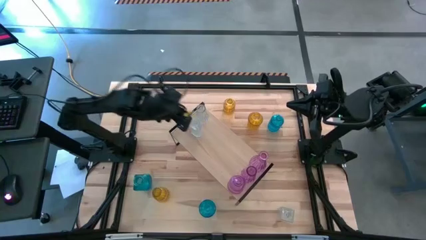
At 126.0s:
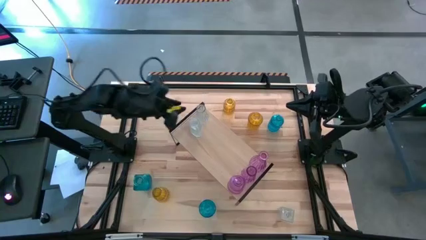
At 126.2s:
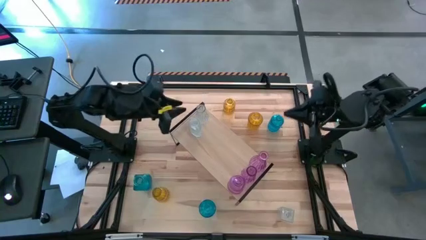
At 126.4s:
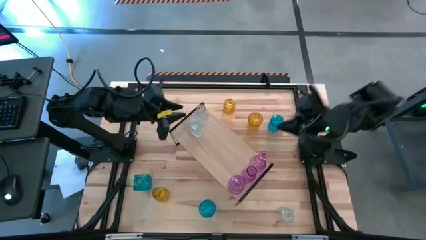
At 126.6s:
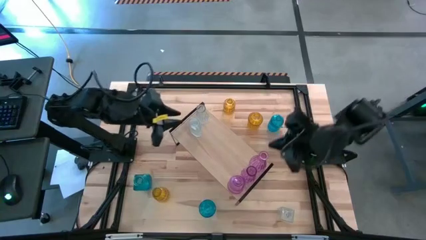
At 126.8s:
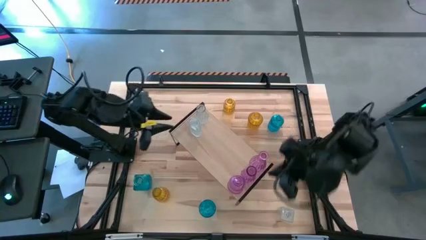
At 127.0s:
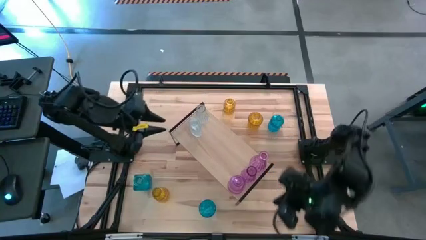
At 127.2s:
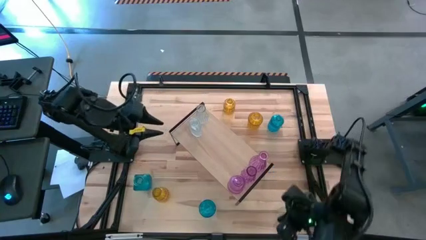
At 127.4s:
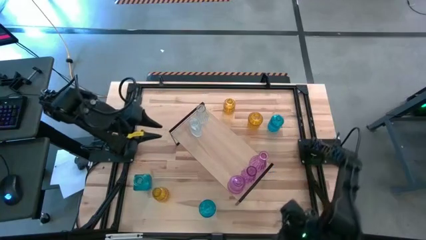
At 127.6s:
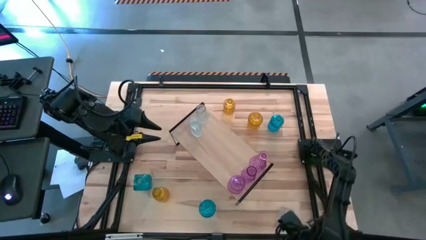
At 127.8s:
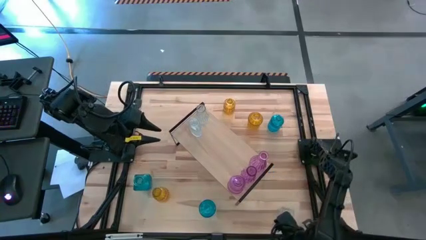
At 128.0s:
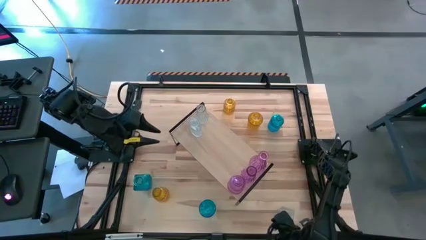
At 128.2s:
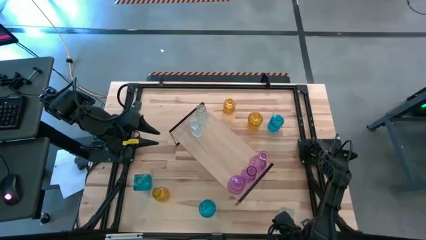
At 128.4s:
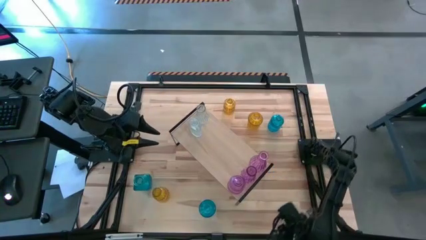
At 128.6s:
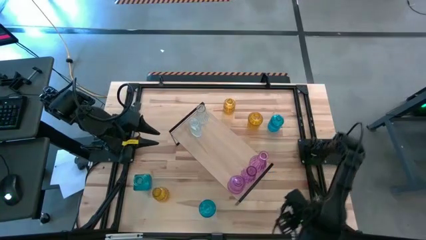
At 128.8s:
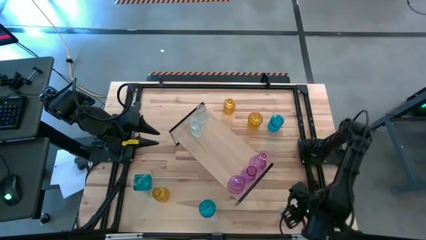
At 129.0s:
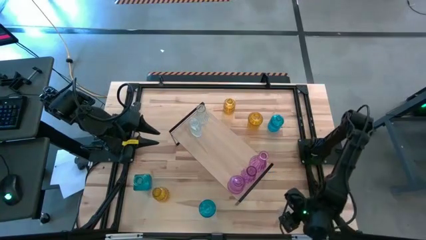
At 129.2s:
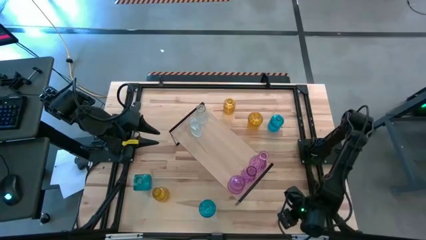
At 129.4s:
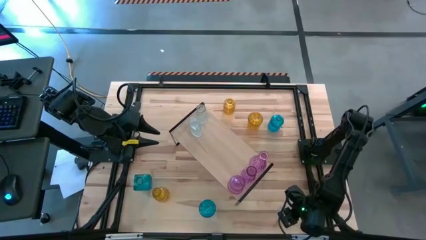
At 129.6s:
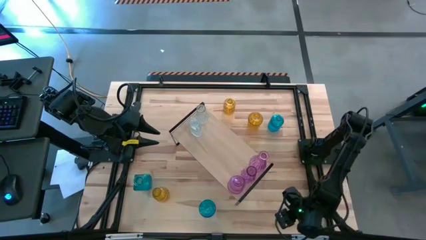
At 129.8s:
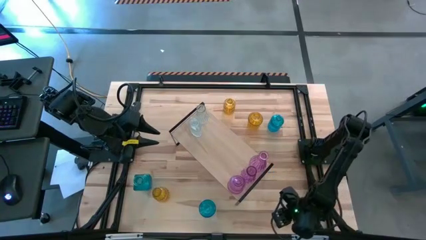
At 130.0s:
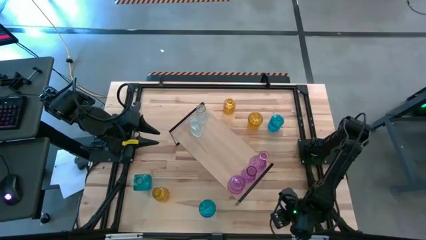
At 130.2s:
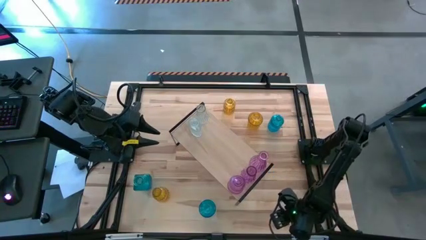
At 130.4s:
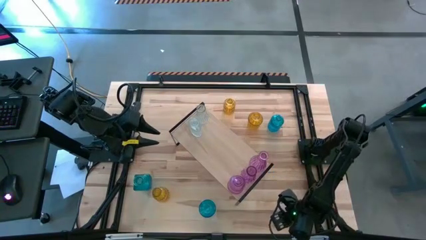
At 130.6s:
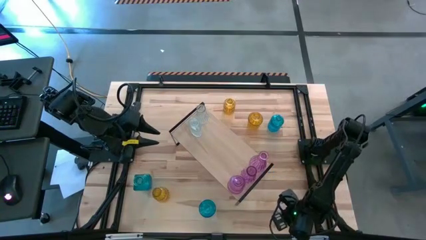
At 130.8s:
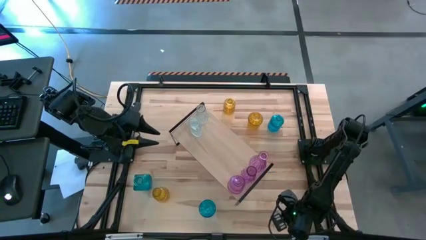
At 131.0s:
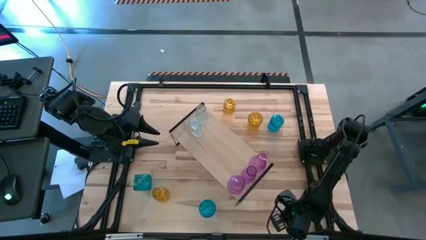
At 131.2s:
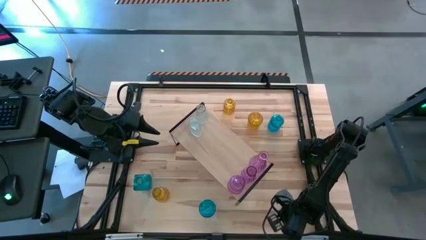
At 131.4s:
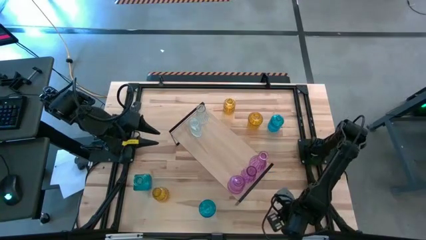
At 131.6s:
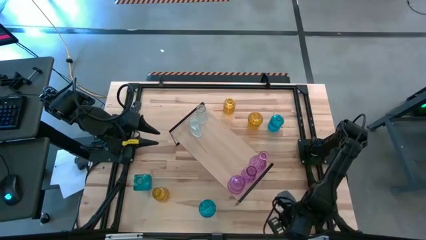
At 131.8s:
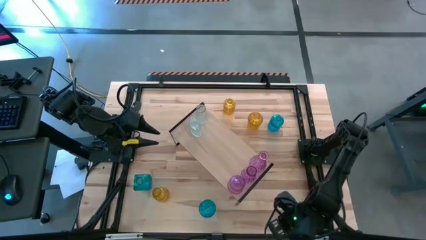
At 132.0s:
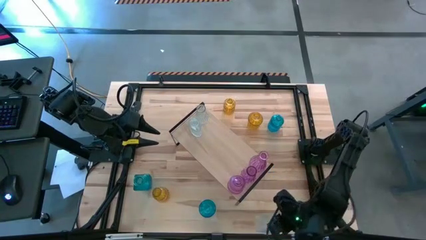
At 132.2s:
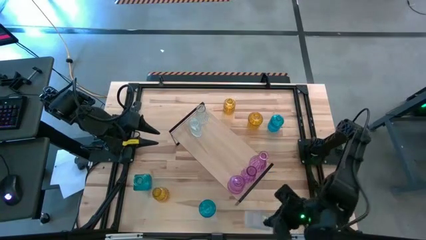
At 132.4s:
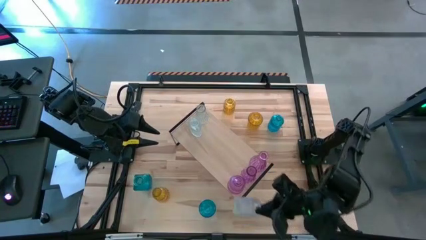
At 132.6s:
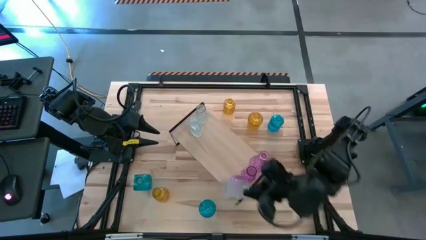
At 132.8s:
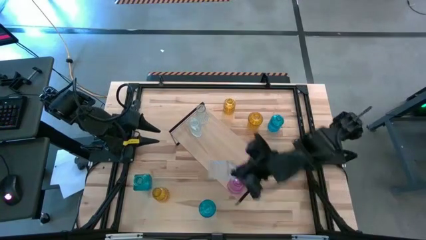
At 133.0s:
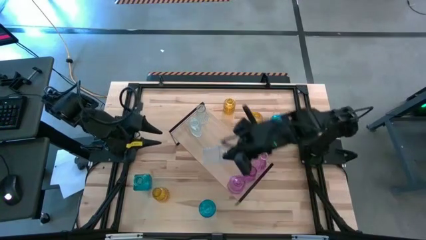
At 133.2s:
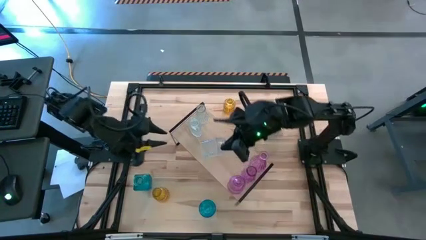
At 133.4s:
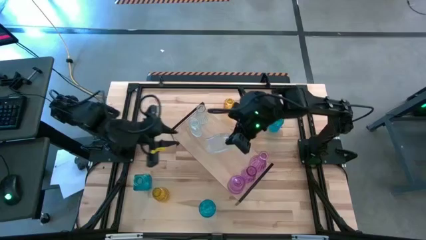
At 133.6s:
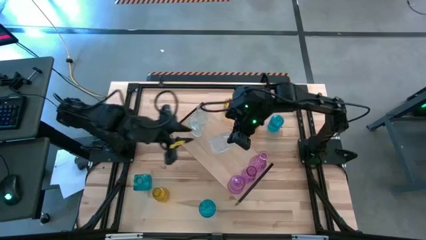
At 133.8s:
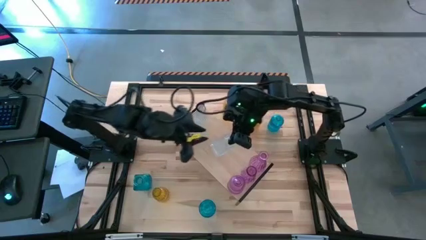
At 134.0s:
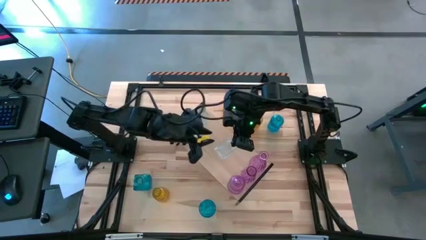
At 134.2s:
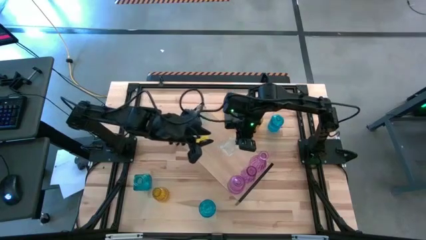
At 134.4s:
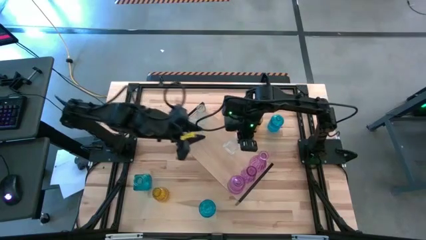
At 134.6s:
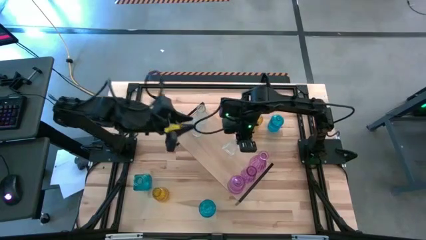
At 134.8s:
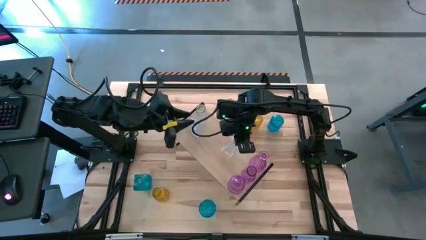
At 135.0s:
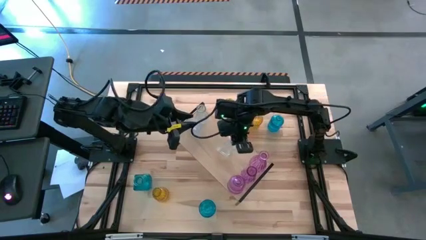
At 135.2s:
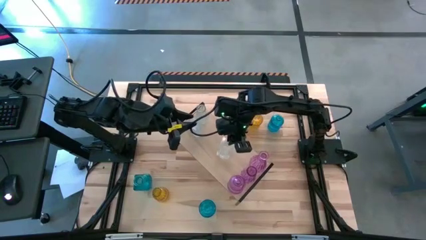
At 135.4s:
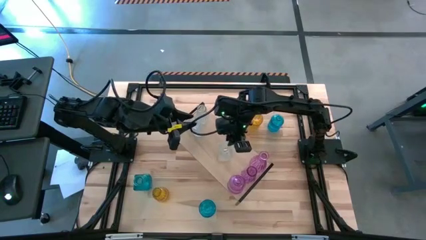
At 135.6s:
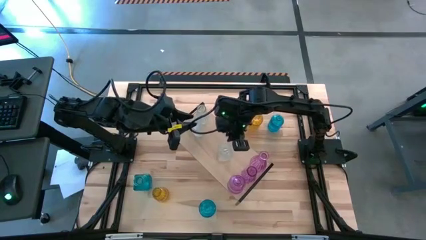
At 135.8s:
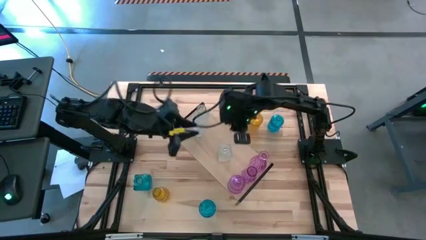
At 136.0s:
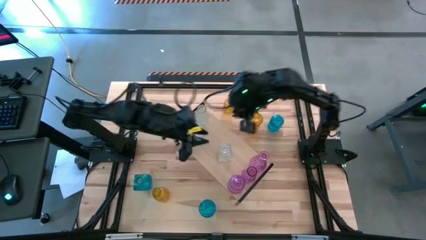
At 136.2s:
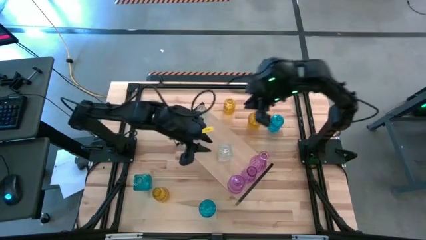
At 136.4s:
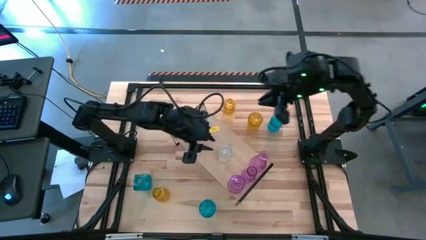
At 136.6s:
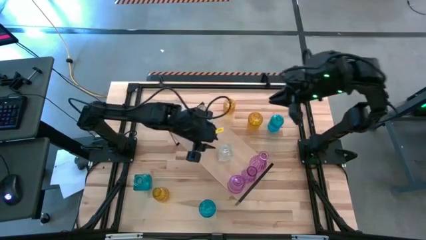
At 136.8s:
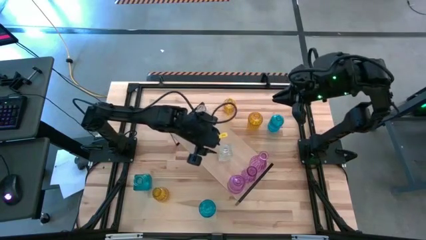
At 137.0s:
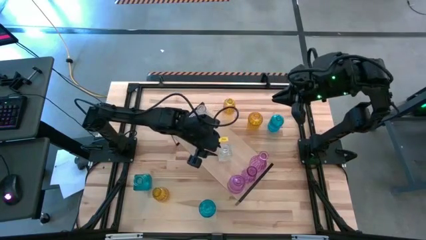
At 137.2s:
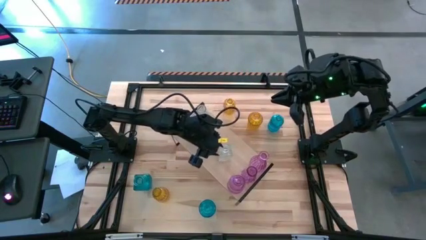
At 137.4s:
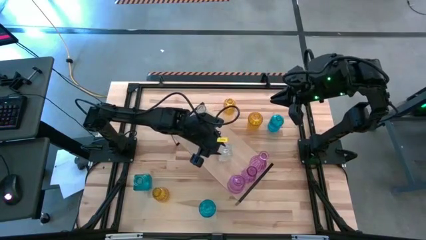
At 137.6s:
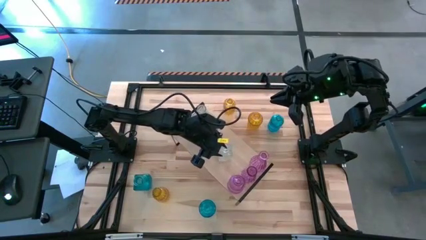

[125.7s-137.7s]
Task: sort vases onto shelf
Put the transparent flower vase on the shelf aligned with the other transparent flower vases

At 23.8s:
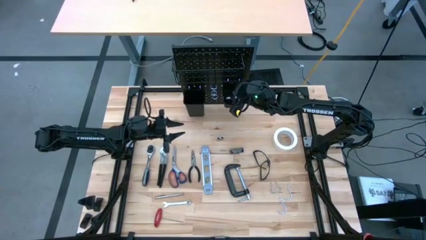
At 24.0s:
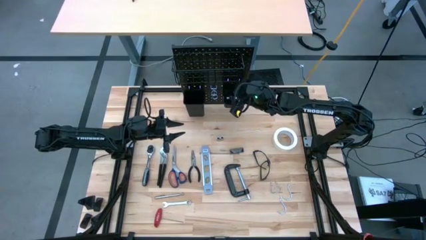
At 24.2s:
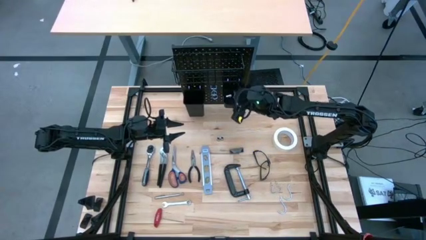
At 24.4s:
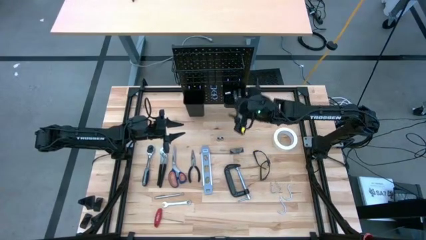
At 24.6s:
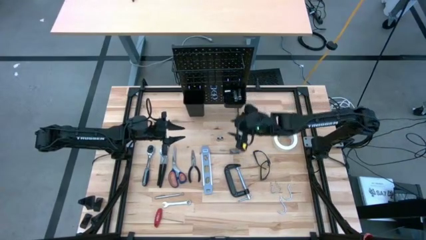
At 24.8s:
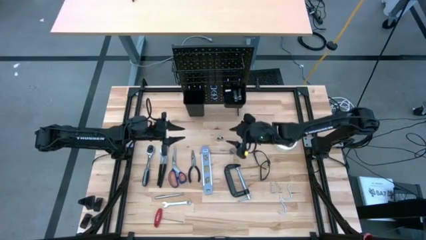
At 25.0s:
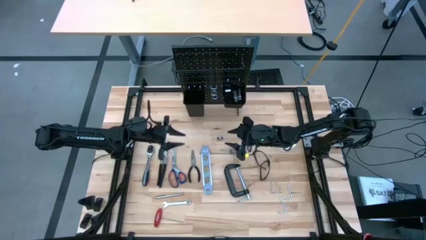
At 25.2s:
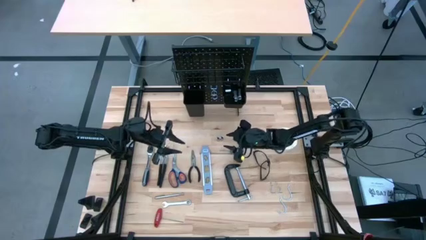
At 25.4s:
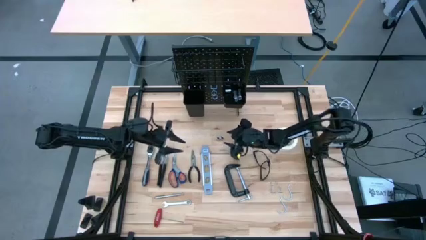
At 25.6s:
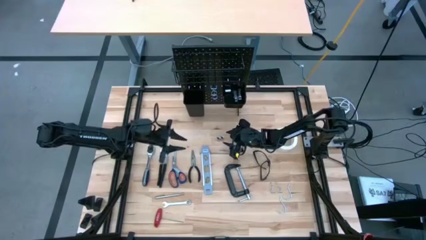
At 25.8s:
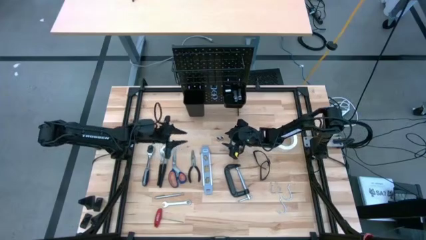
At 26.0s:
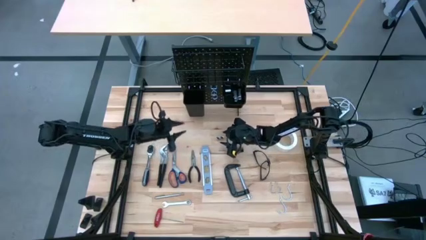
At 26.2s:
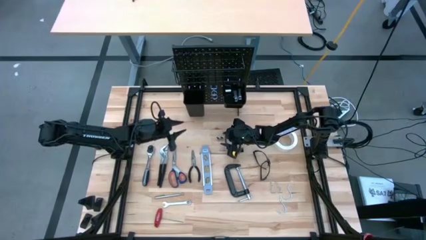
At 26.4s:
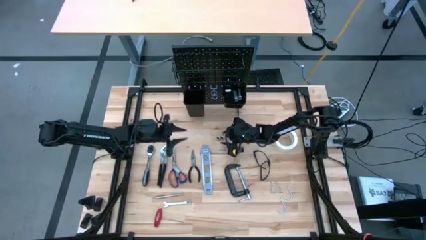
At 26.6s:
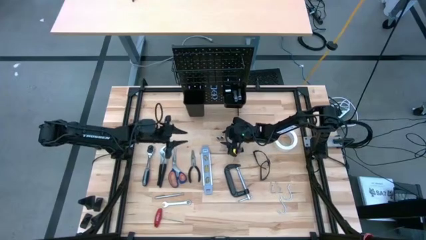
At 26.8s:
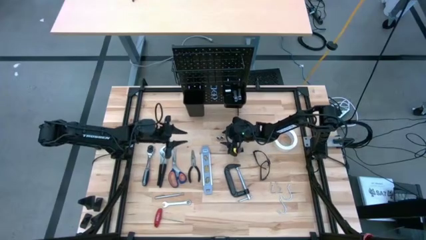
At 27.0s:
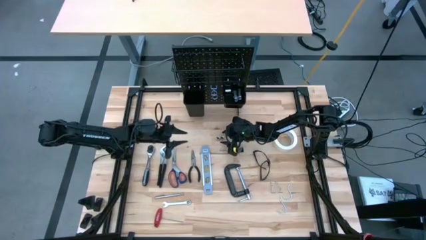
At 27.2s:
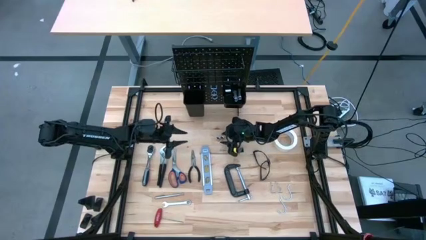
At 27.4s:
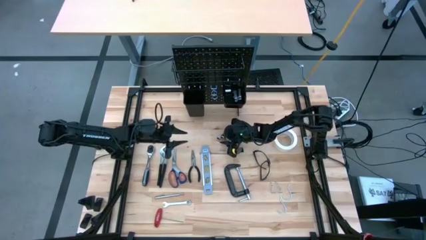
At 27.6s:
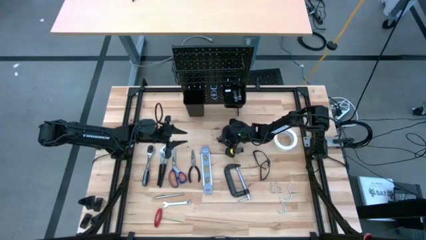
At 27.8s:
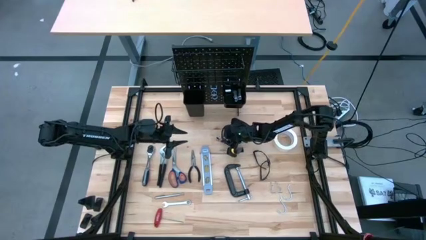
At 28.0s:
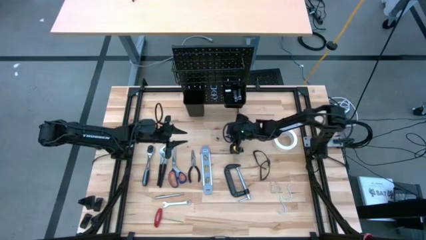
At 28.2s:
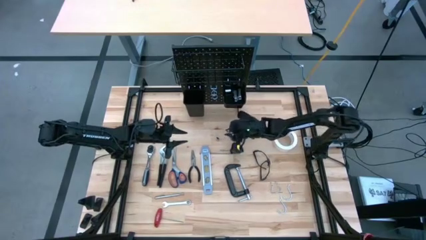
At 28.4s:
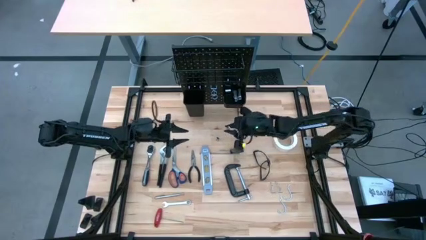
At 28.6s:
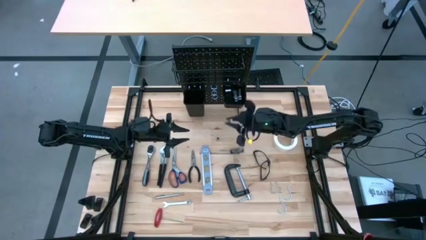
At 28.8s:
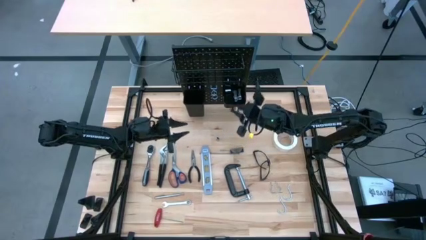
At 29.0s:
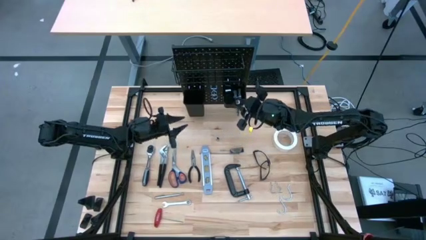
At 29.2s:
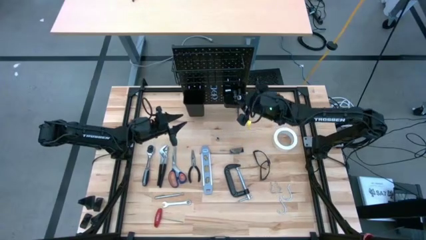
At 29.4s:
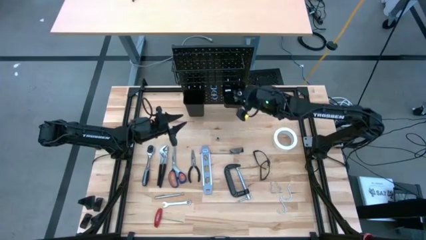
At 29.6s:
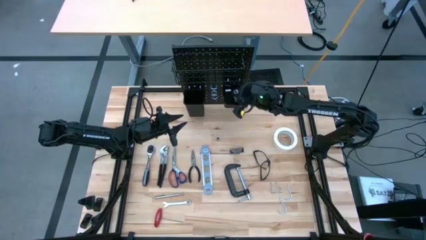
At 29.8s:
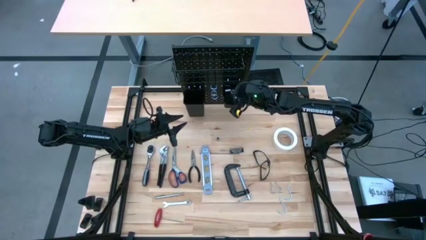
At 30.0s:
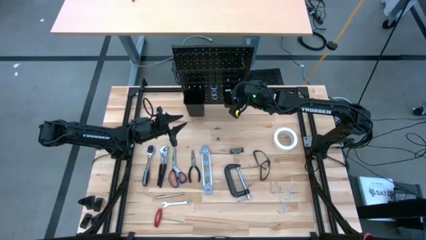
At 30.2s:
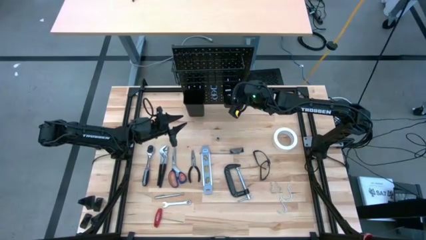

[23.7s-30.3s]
Task: Hang tools onto peg board
Put the right small socket into the right black bin on the peg board
